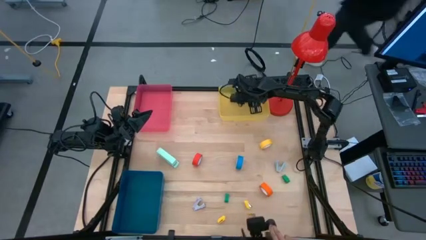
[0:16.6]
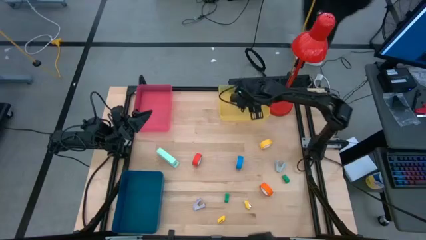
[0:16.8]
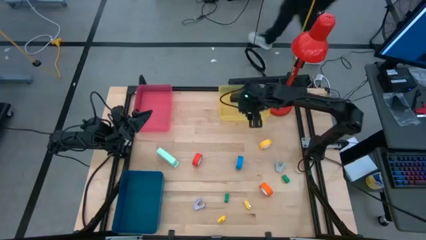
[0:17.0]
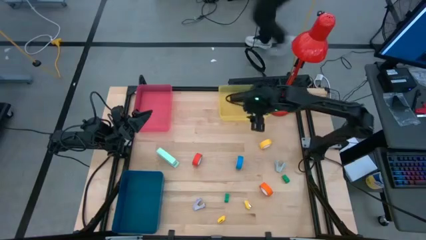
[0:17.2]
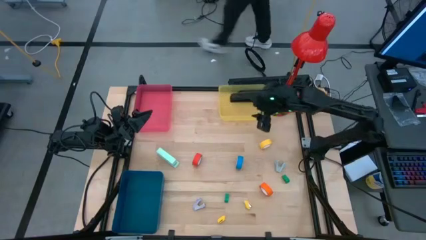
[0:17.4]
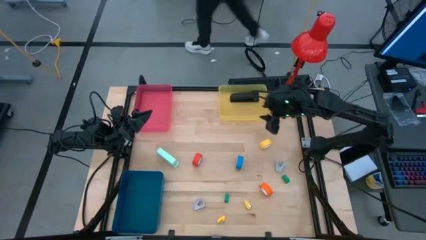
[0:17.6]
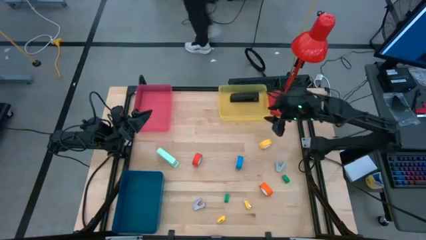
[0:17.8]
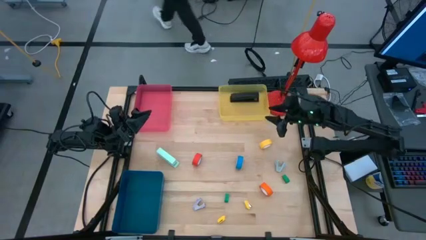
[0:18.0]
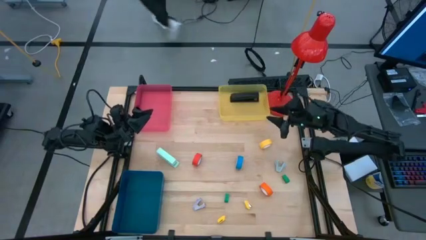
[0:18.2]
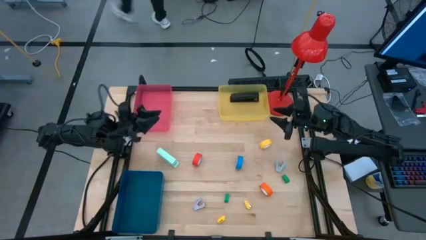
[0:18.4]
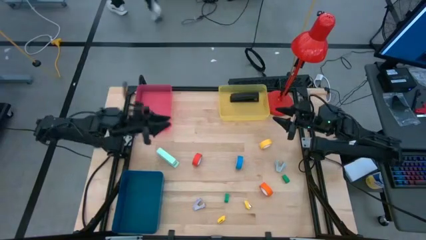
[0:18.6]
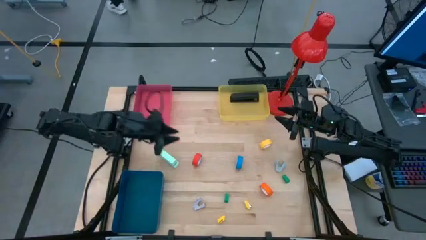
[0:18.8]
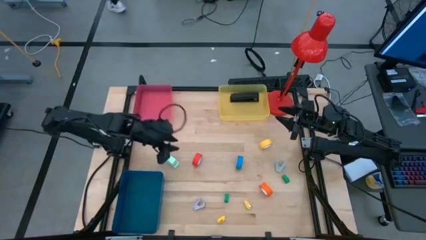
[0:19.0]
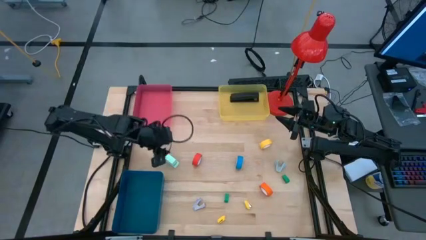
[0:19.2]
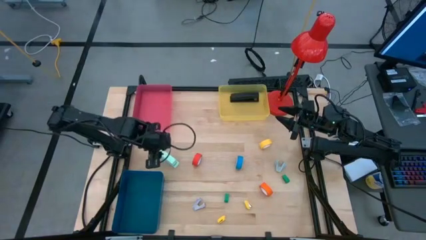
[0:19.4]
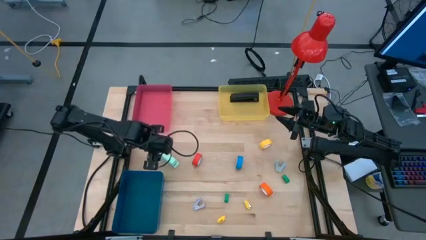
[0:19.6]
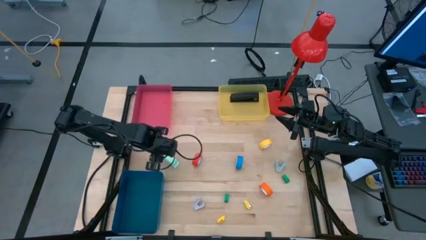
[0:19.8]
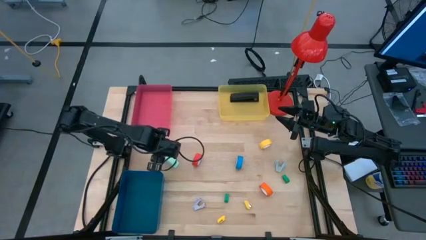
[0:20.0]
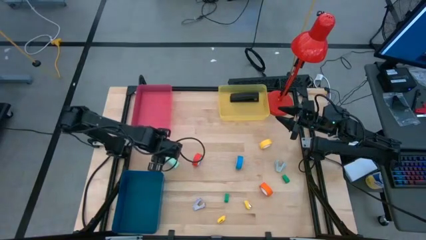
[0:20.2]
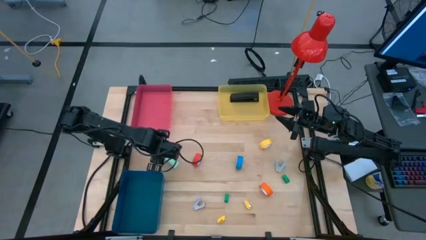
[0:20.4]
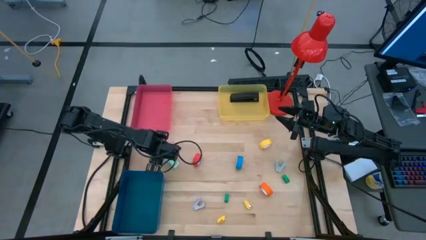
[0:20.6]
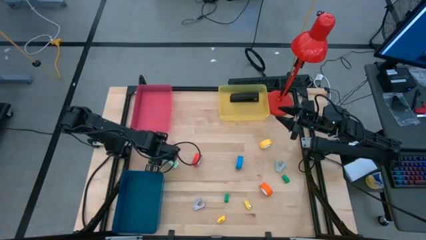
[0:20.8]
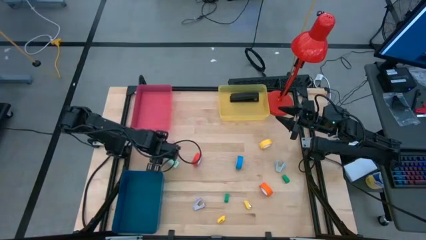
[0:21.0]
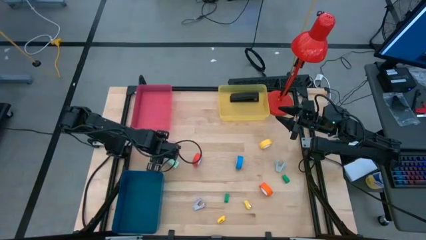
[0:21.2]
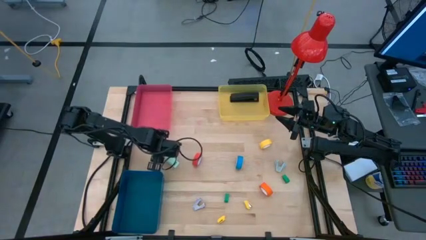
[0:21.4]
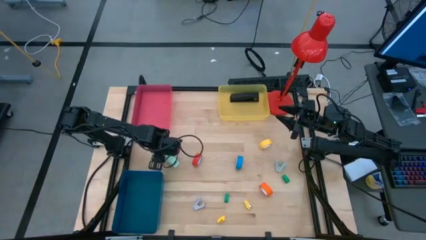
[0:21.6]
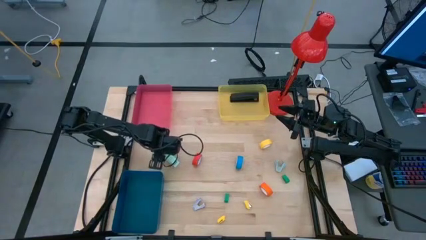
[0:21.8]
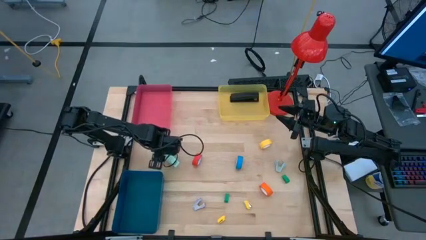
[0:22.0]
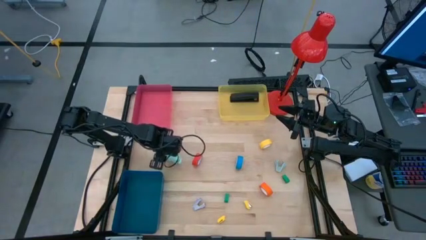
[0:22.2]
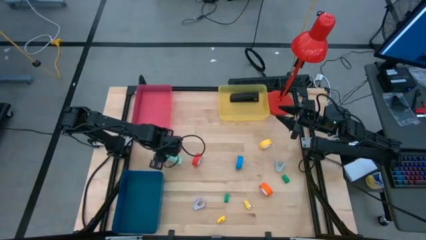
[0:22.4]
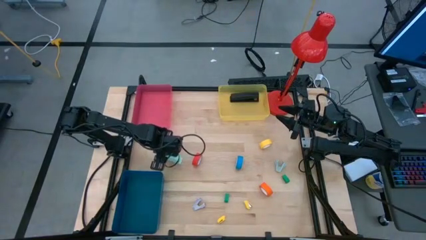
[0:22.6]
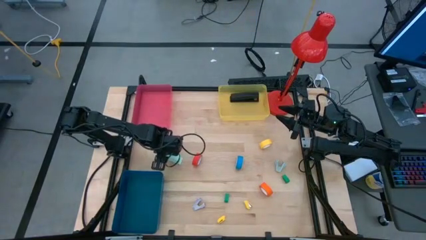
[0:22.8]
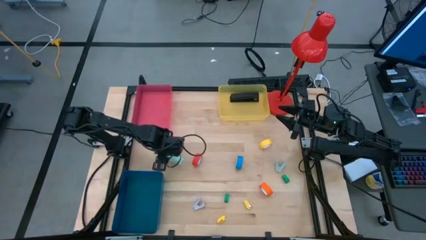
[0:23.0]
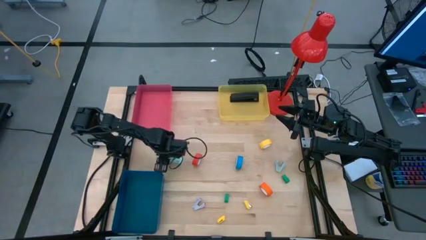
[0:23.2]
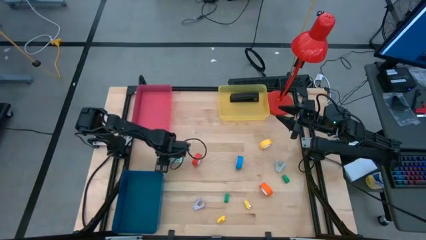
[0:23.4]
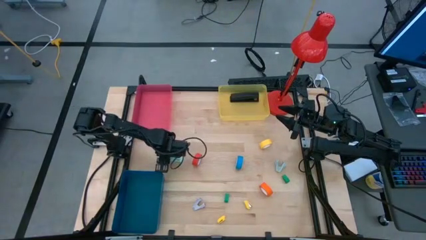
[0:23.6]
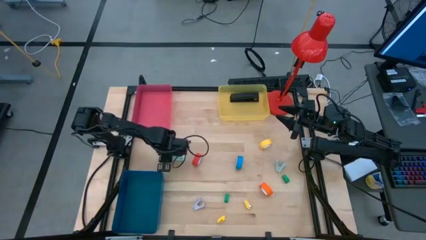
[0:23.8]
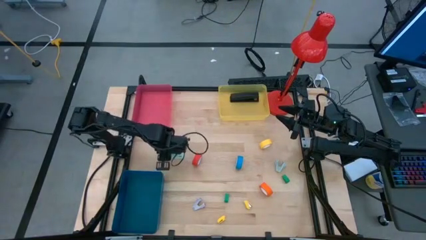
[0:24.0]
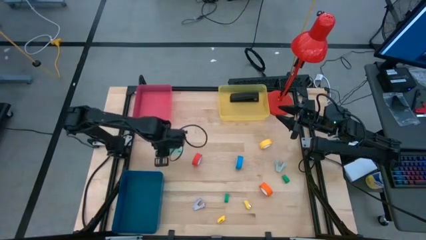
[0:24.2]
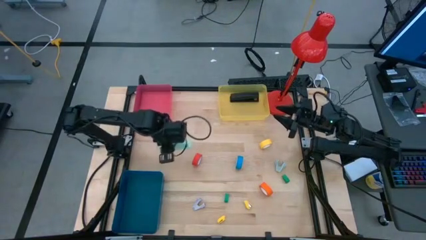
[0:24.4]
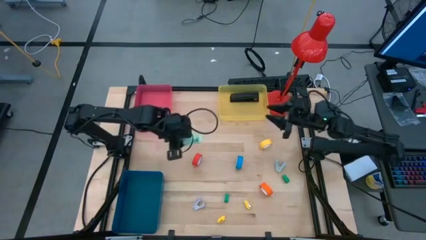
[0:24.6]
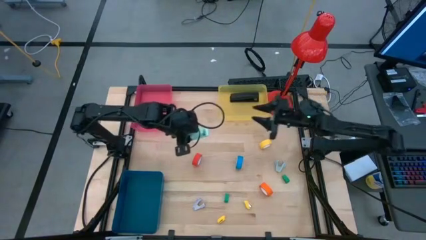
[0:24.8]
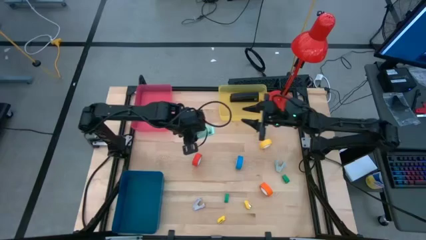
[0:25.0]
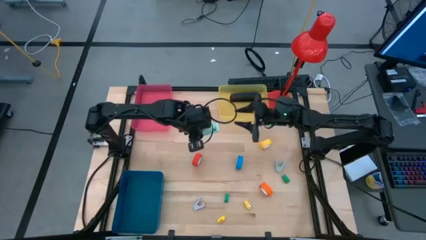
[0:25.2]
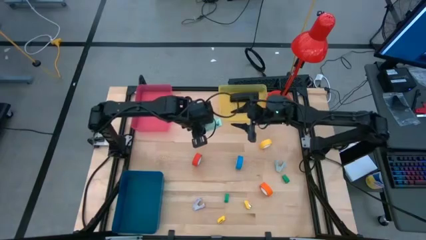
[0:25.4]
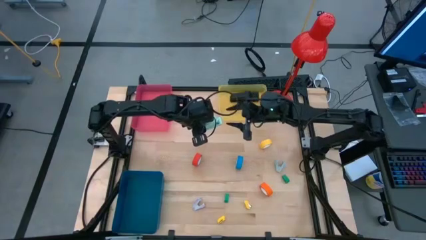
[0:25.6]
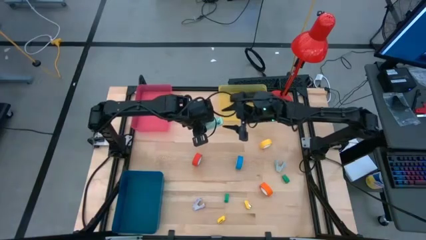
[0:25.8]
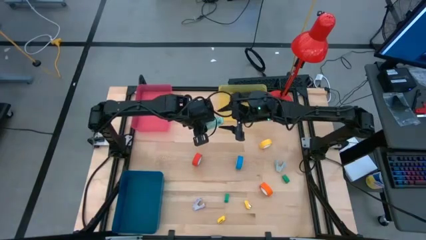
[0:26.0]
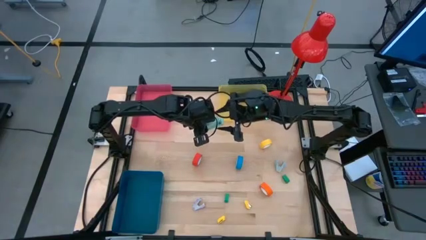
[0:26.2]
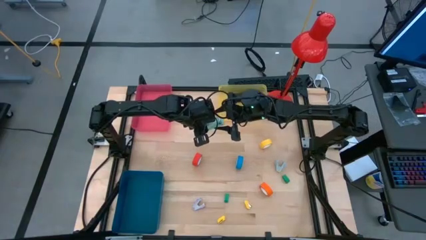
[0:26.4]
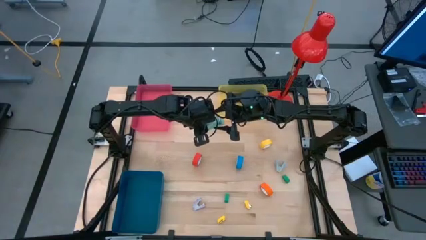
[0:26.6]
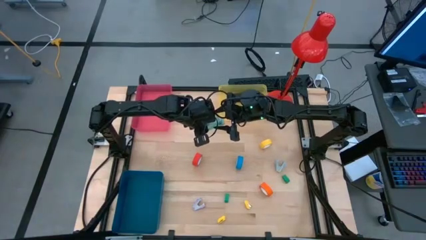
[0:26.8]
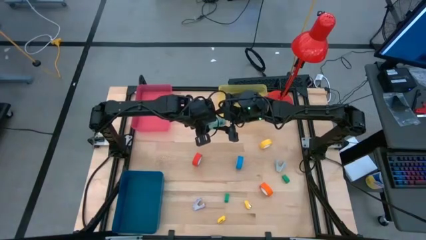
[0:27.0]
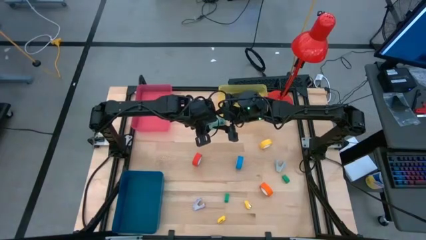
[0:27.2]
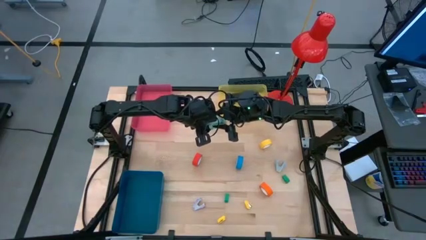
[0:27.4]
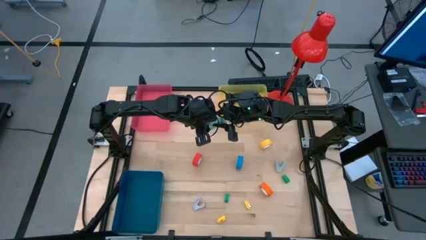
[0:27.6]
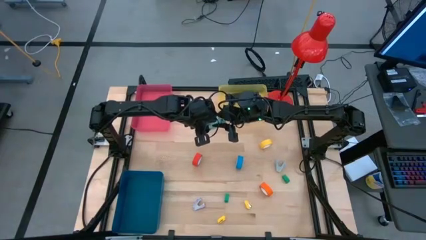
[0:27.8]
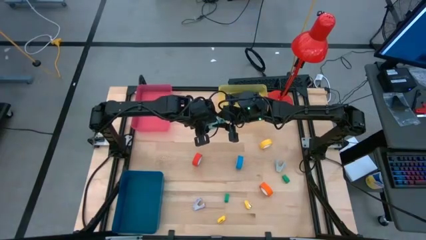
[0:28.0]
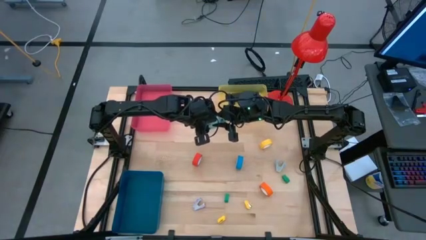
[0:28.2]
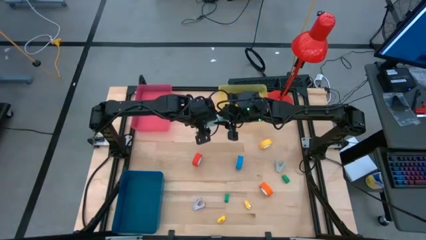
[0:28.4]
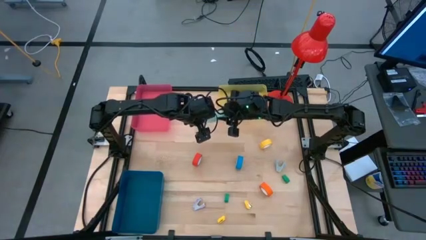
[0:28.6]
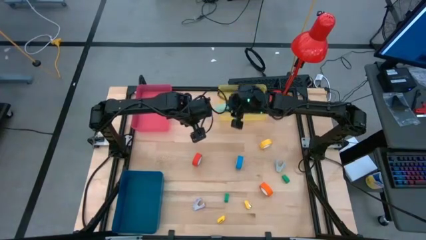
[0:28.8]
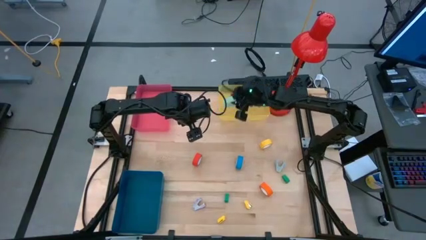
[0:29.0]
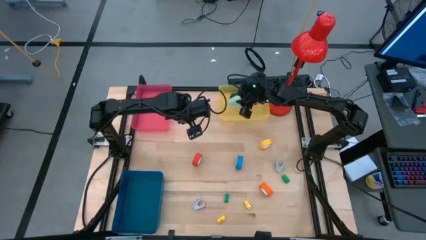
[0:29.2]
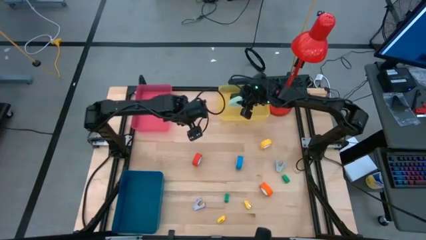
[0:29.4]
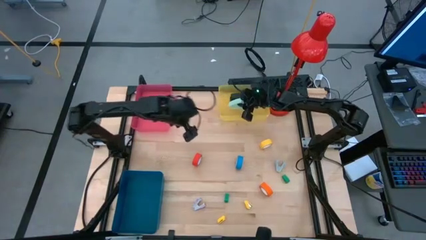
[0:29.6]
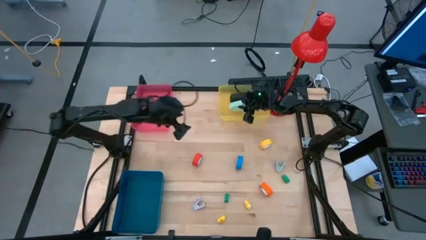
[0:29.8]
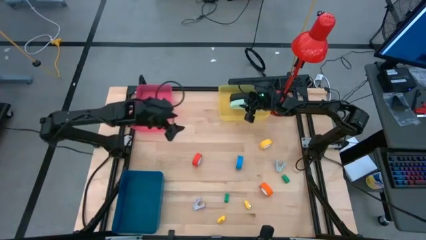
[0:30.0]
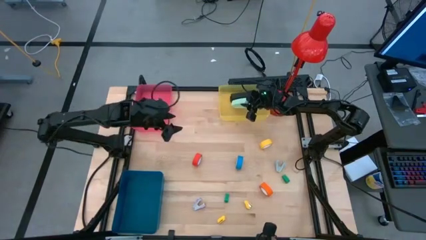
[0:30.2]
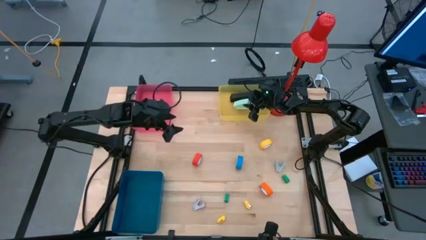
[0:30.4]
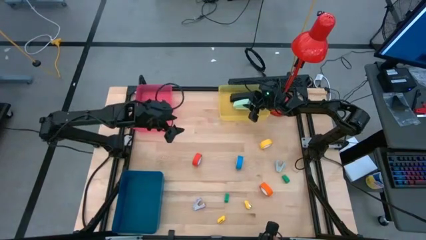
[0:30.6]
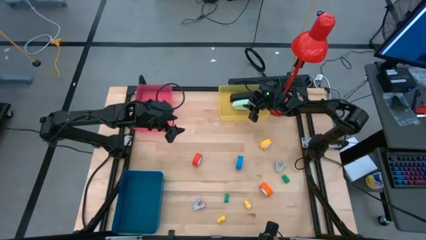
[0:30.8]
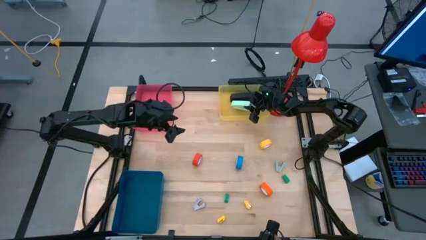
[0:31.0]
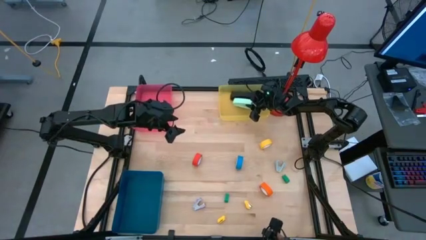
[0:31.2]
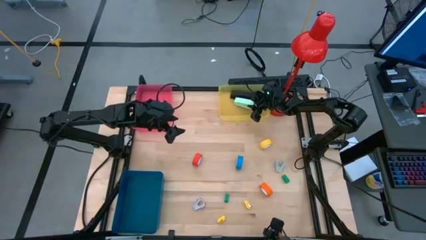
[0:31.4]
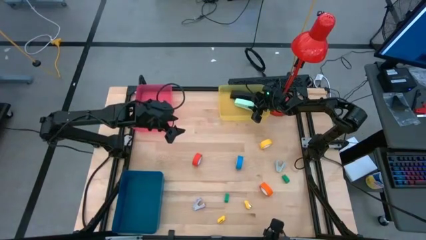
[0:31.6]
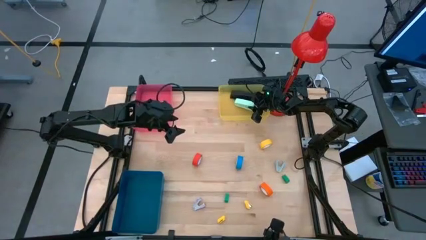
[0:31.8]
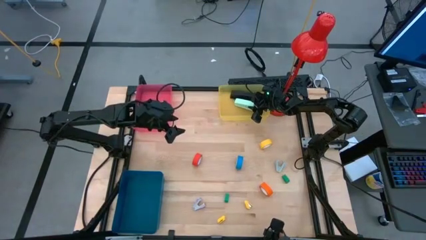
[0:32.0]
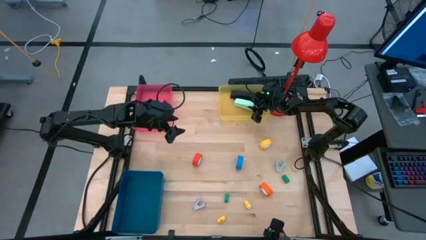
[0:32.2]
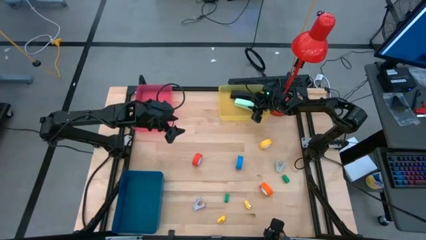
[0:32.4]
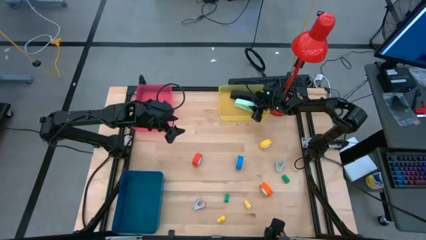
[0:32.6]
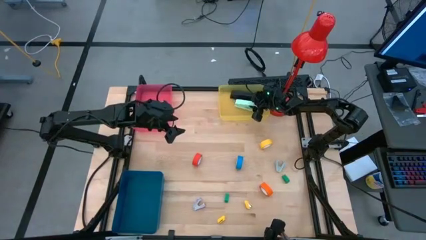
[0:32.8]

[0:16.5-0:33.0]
Task: Pick and place Stapler, Stapler remover, tape
Put the big light blue stapler into the yellow bin
